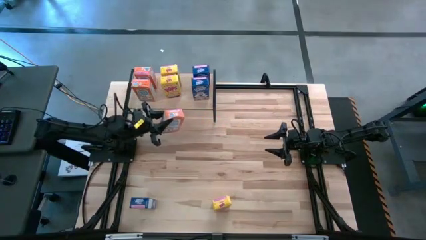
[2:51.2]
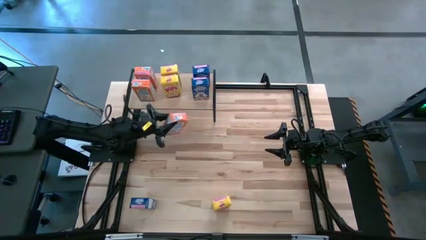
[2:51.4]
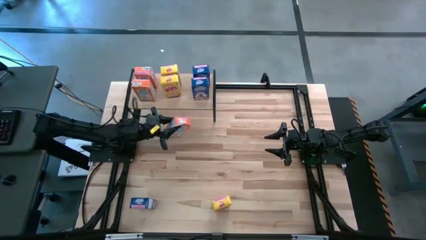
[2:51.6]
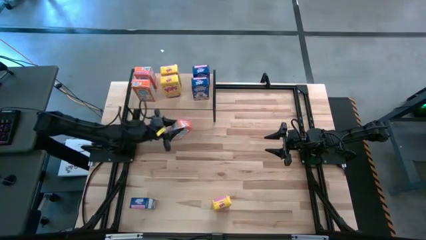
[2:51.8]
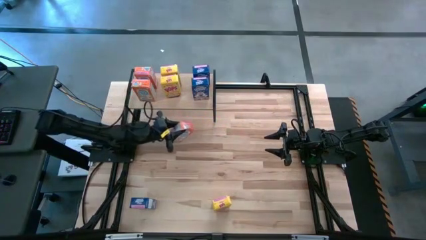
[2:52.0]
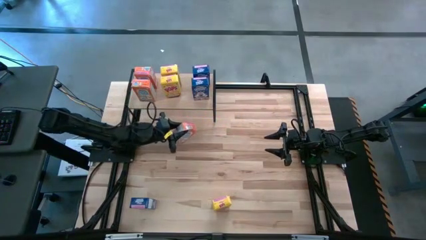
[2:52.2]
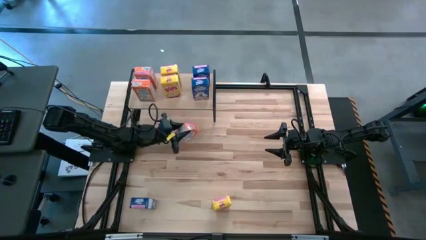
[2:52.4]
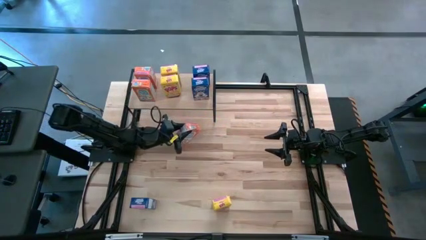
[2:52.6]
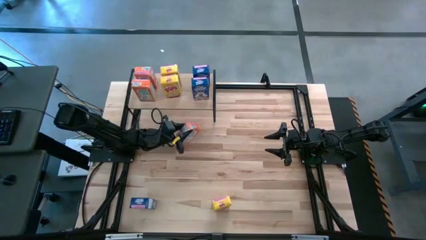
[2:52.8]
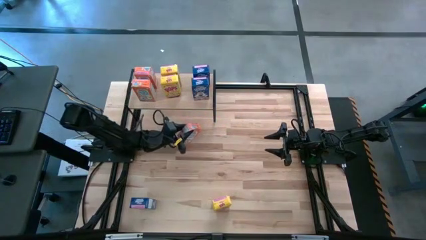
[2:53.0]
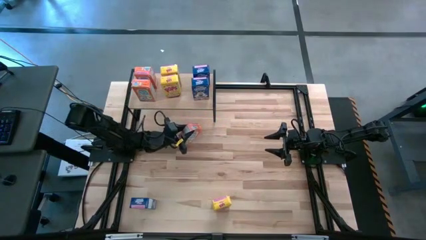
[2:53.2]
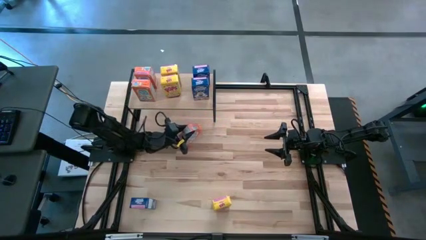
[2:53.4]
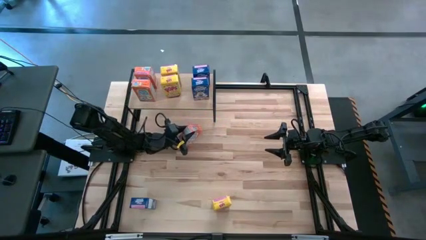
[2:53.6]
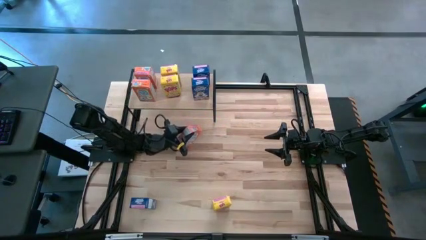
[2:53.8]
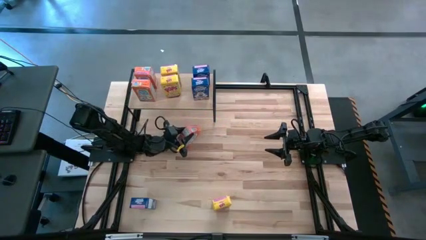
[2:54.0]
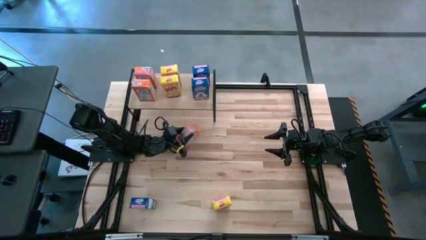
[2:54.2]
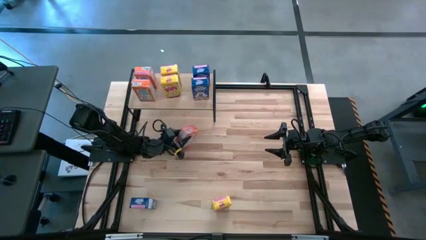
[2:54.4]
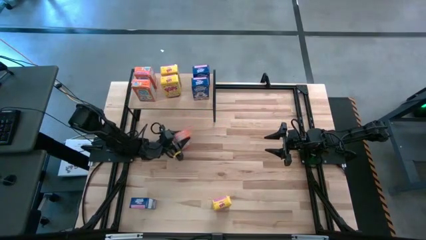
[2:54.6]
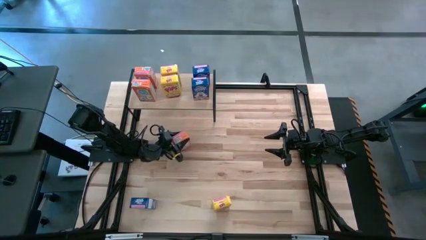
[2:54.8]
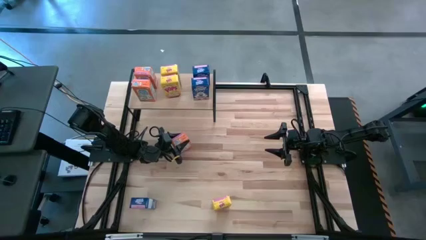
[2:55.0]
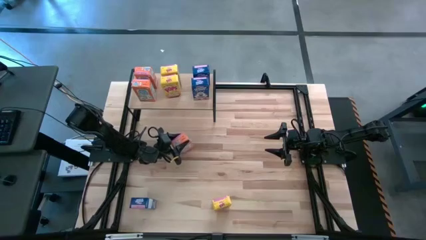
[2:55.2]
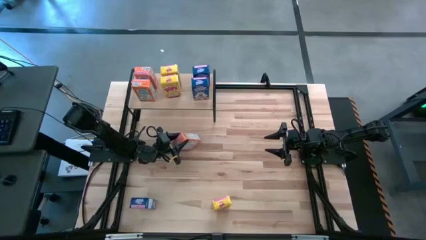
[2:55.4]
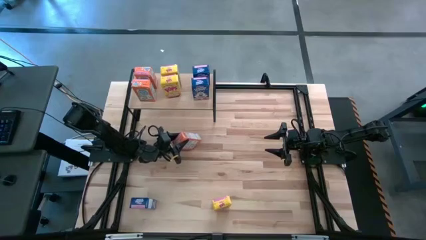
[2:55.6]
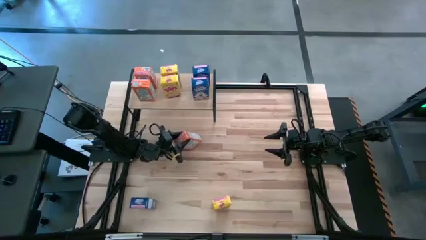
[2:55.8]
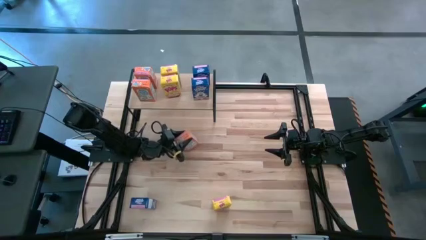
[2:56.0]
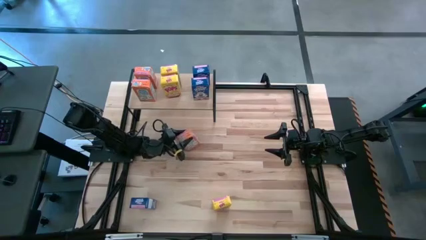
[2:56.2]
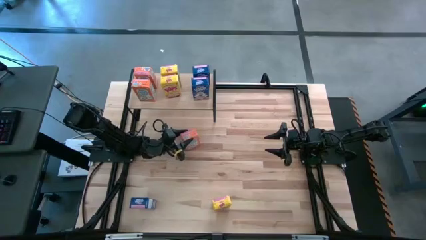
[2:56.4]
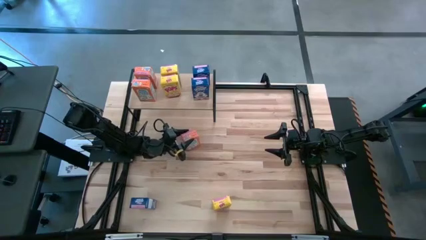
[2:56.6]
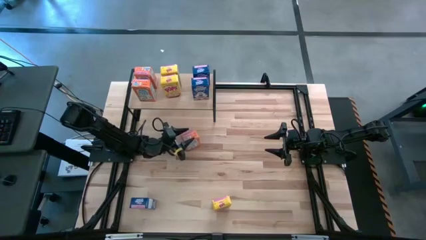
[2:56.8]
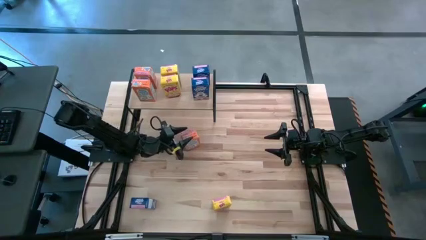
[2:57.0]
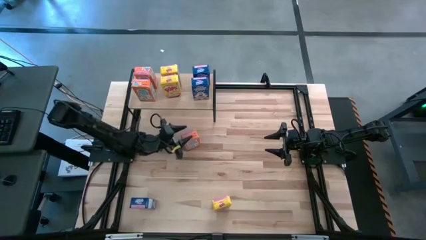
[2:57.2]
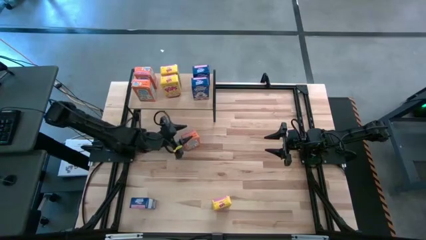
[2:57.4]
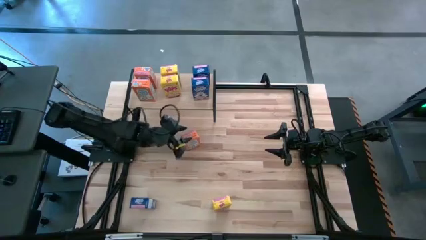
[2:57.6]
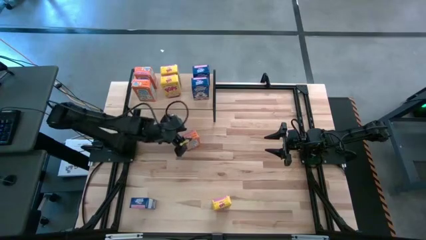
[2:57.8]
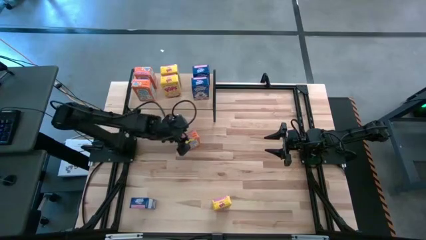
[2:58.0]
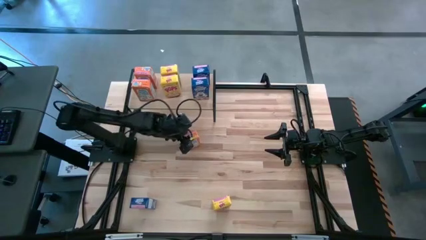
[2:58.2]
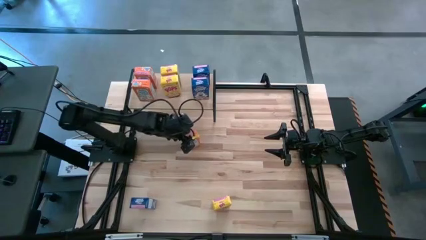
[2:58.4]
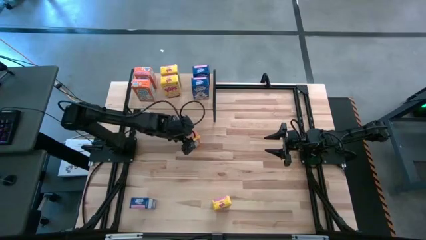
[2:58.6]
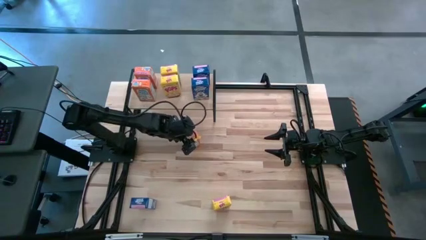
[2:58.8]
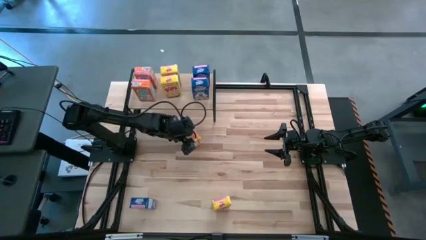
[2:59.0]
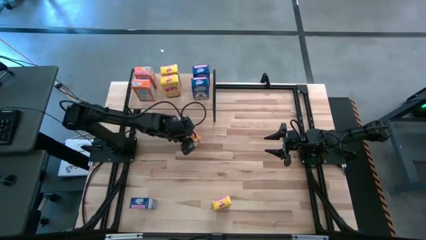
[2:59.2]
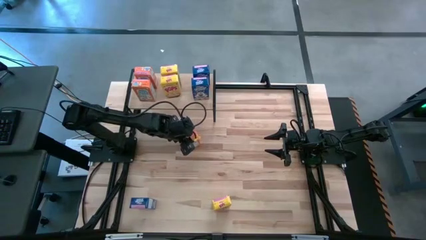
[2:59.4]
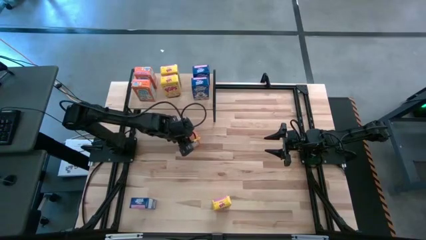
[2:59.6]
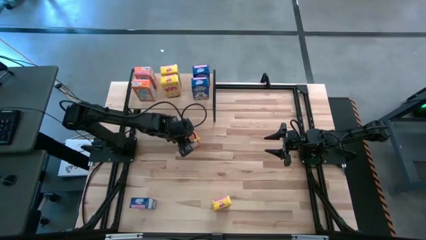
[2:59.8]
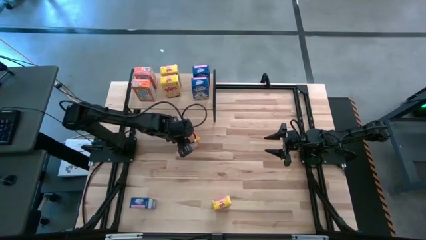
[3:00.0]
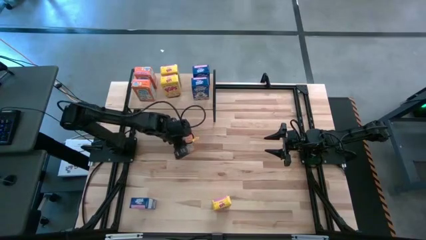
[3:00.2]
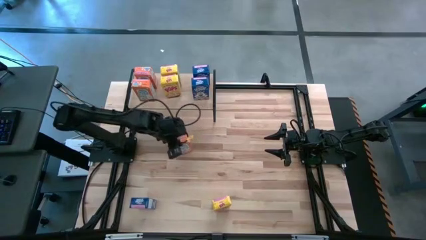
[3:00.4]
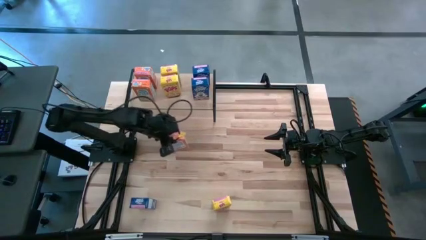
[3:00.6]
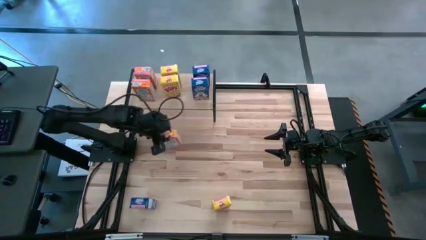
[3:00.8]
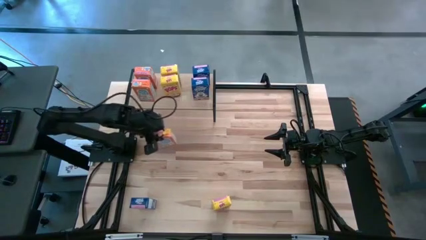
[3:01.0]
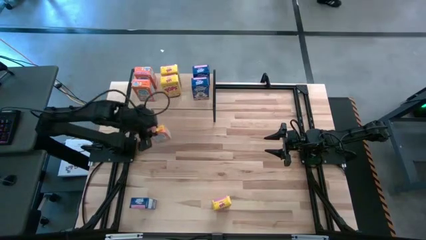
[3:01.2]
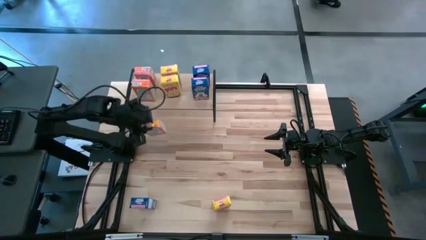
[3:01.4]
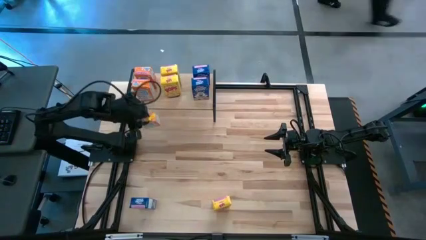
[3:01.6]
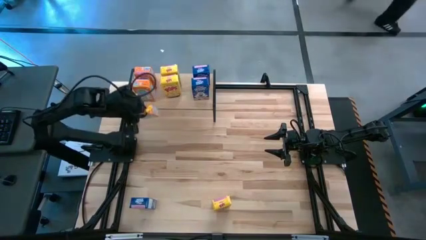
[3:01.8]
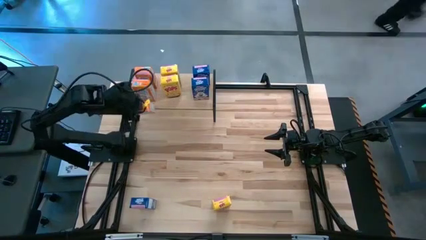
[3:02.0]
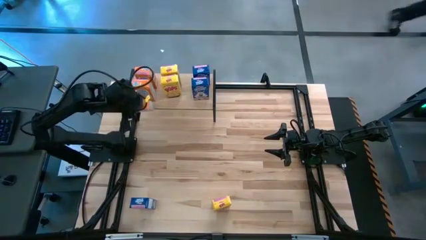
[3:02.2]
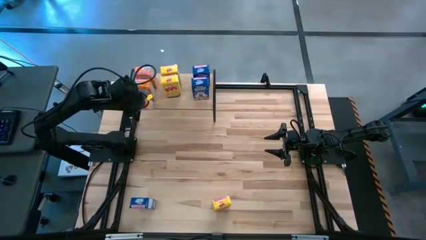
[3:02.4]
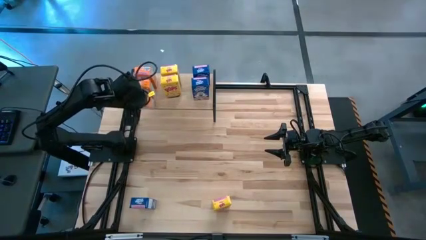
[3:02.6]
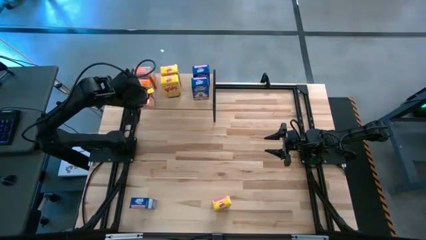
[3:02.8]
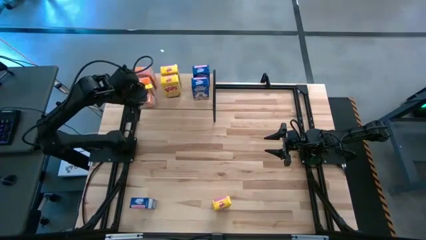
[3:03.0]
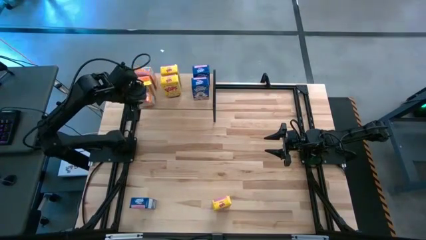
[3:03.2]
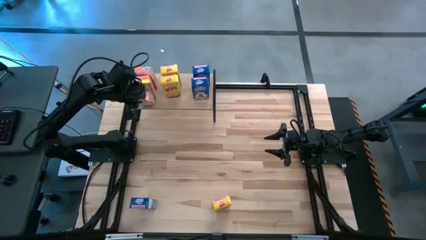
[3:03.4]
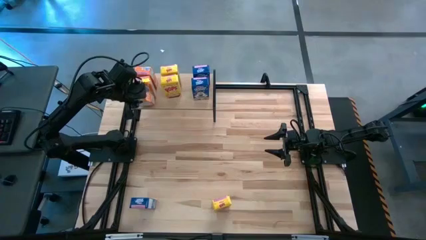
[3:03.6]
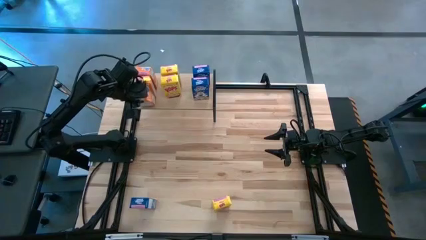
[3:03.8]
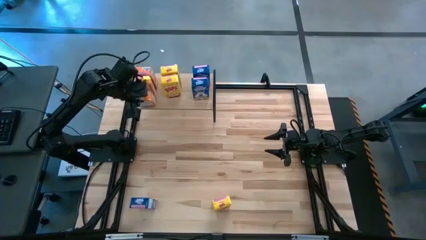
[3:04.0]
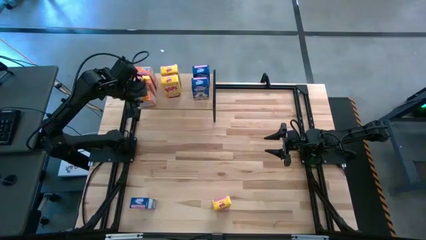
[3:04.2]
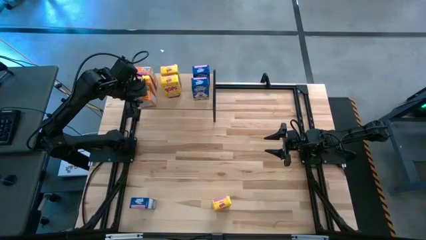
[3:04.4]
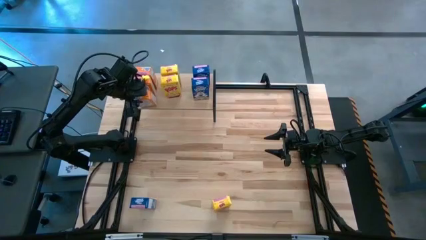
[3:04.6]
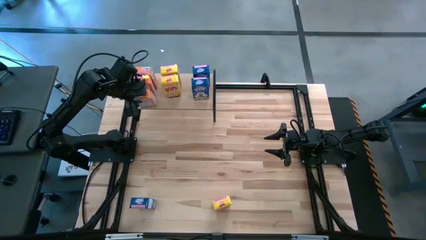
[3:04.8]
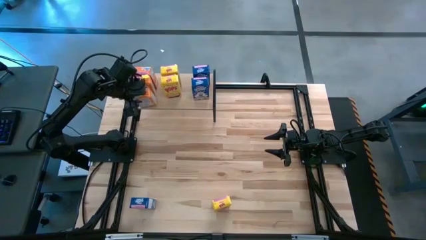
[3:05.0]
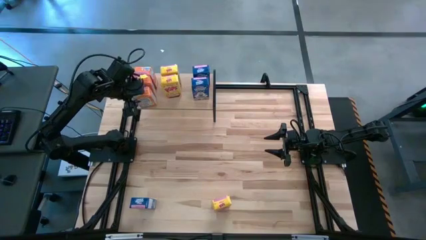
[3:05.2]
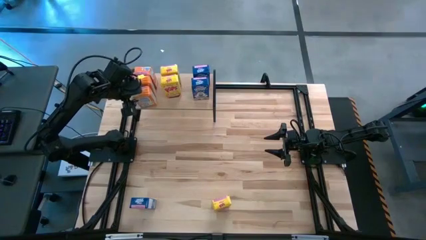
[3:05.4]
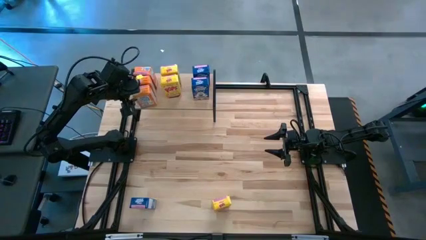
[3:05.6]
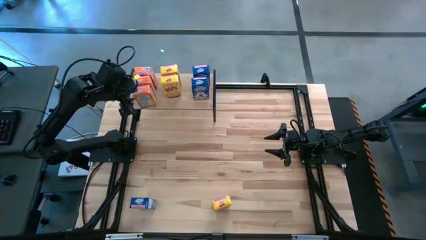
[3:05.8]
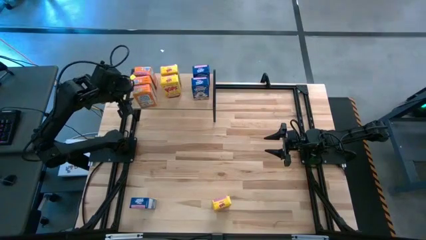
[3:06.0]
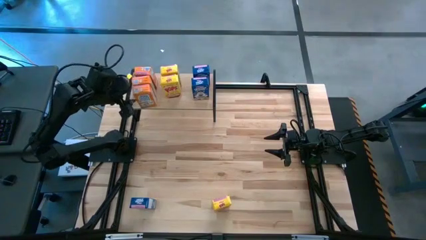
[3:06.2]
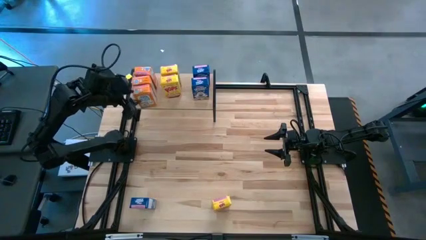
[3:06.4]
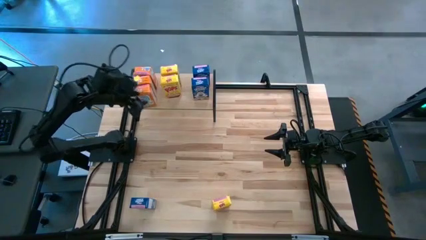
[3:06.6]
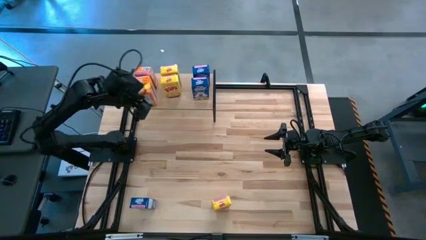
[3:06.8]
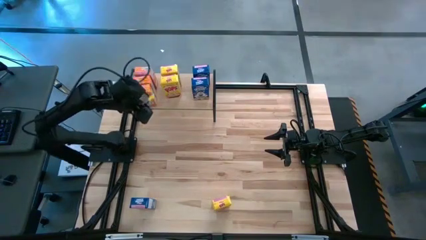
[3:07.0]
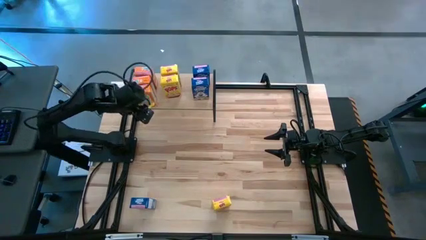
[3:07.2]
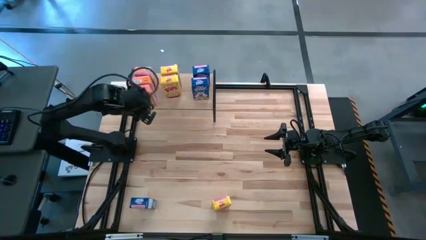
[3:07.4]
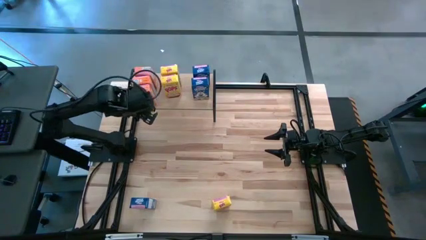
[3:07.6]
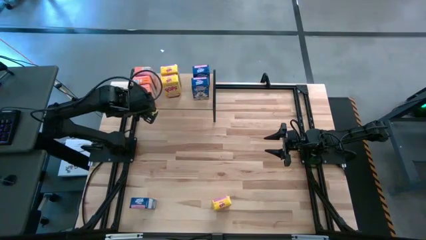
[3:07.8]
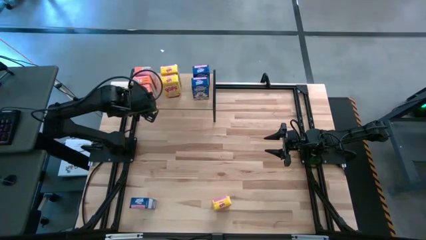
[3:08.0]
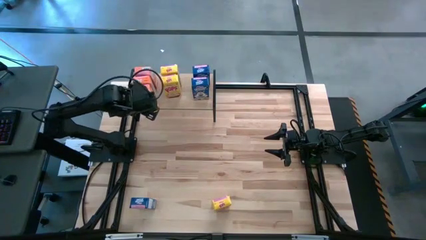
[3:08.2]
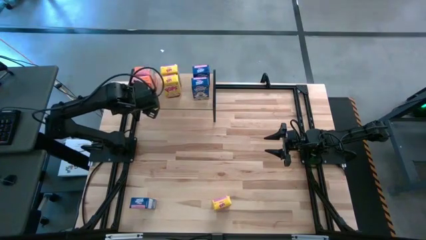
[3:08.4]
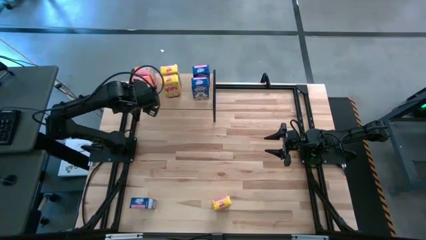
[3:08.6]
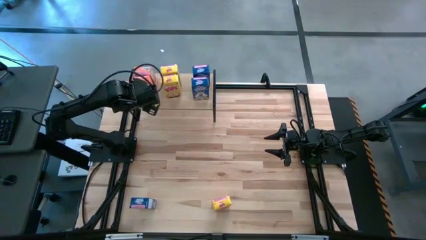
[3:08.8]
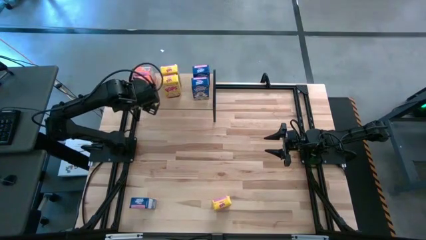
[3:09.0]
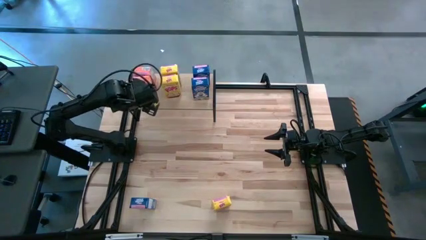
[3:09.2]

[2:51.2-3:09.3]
Task: Stack cereal on shelf
Put the orange cereal box on the shelf aligned with the other orange cereal boxes
